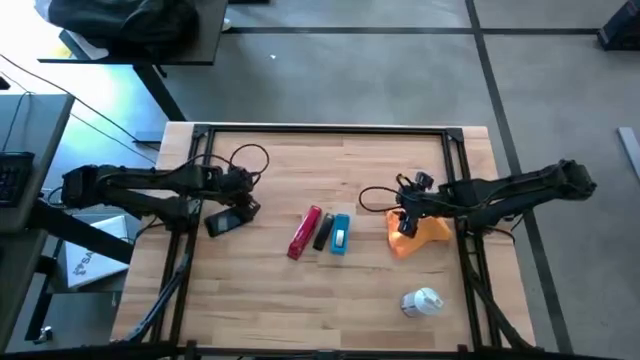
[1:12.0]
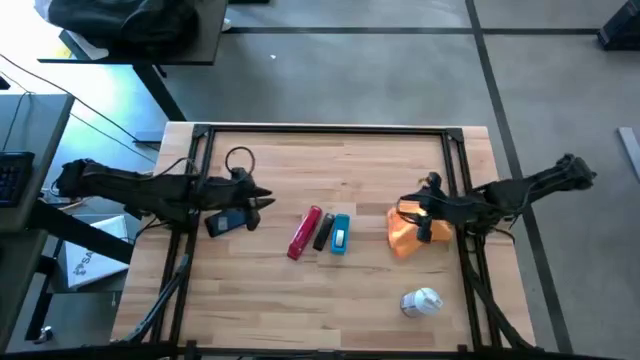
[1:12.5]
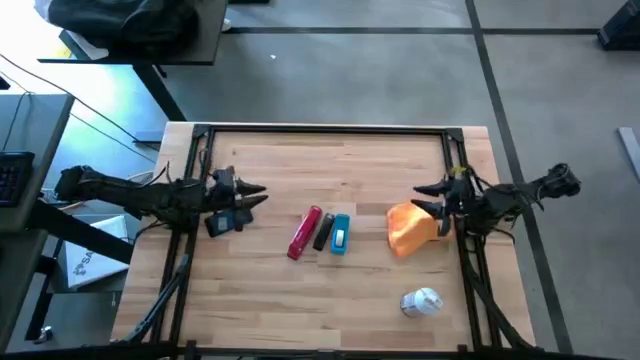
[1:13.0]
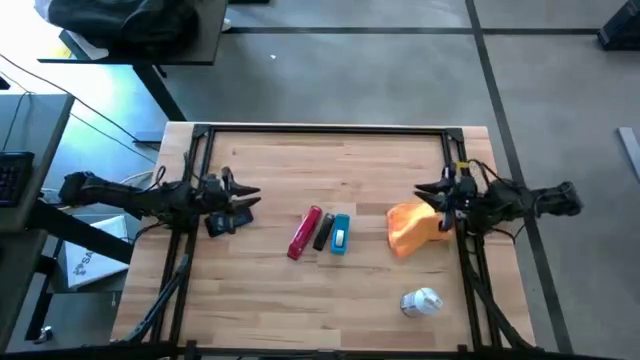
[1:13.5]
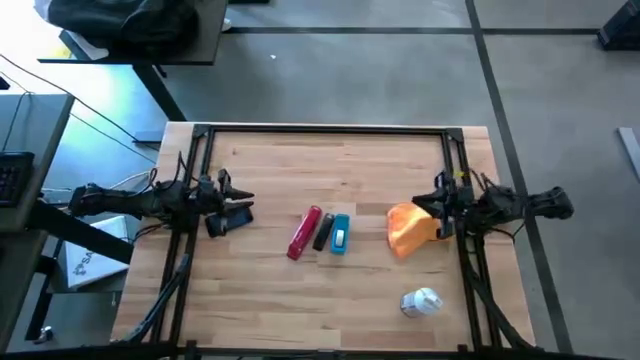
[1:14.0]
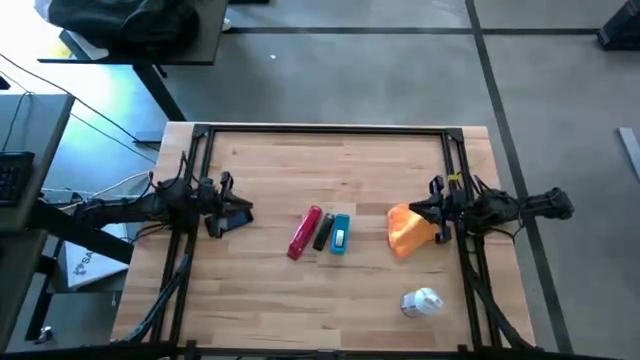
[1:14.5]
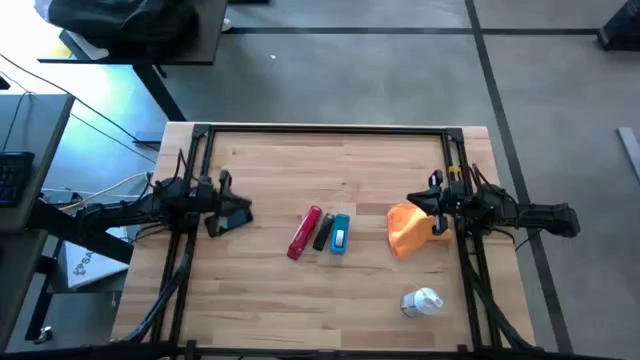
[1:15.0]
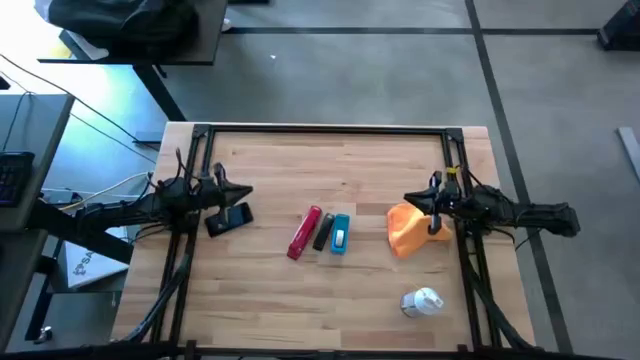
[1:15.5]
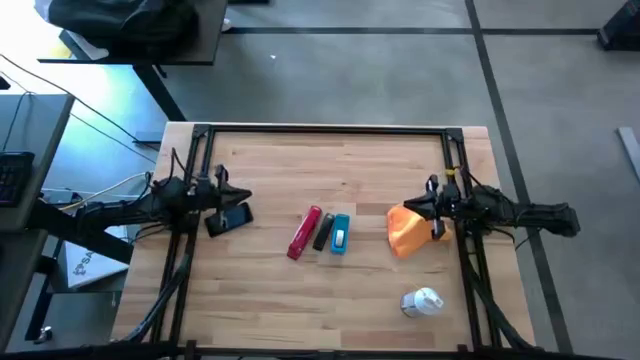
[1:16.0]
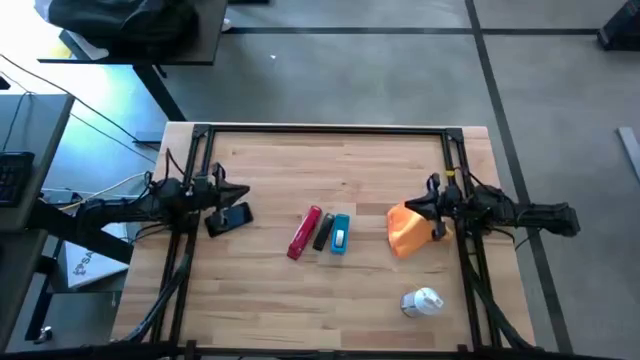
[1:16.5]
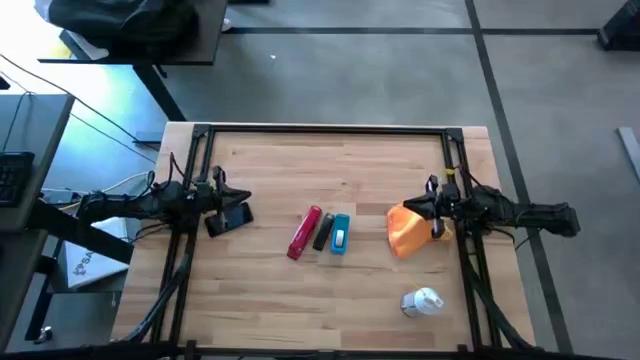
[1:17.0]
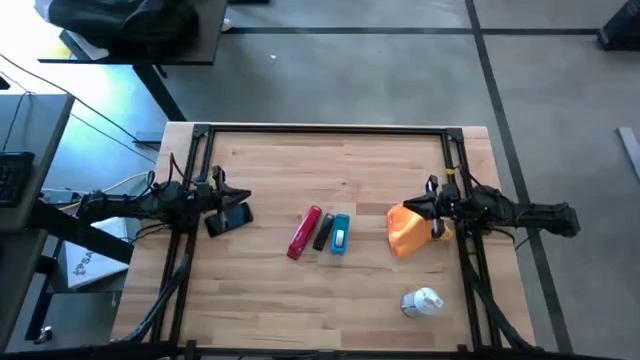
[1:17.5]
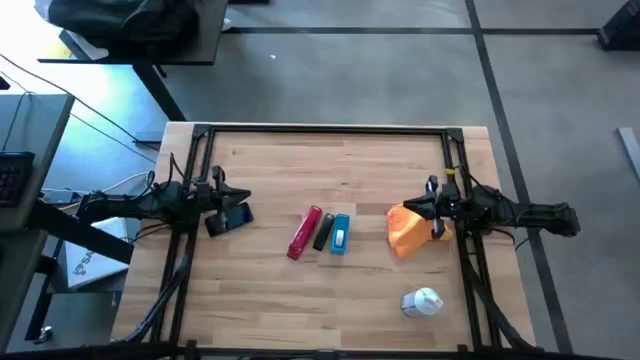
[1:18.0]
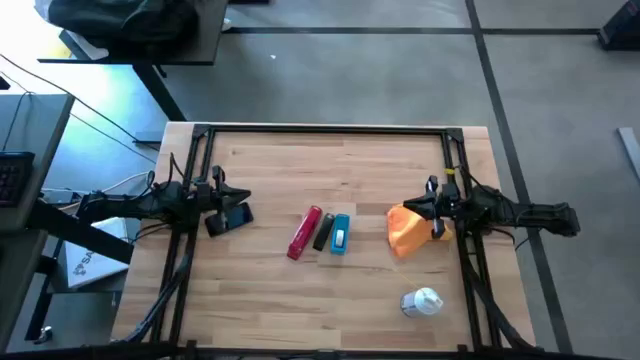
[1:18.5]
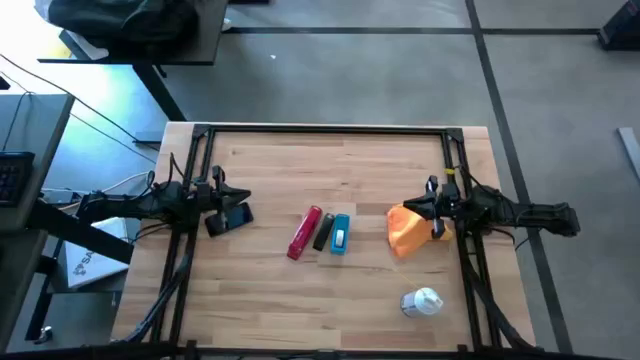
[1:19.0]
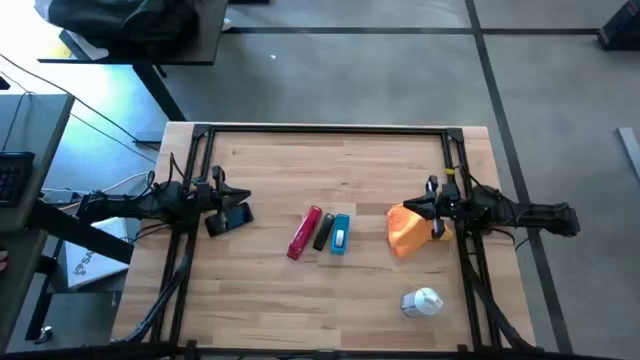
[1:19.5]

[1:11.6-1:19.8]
Task: Apply microfiber cloth
Return to Home Position

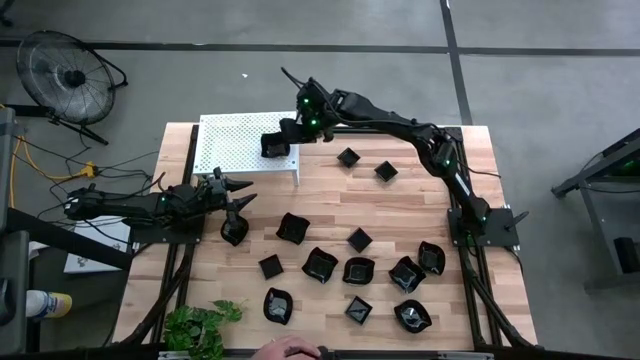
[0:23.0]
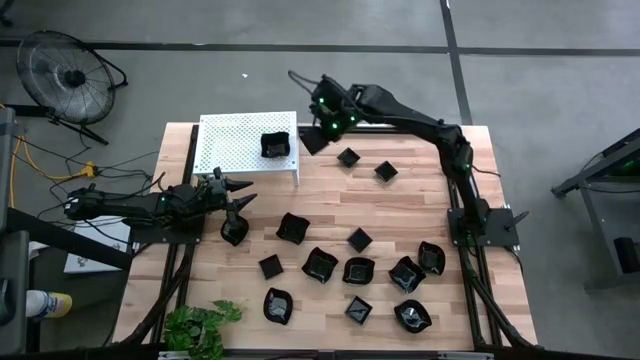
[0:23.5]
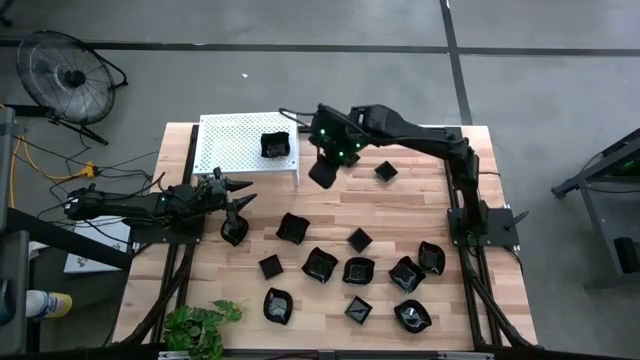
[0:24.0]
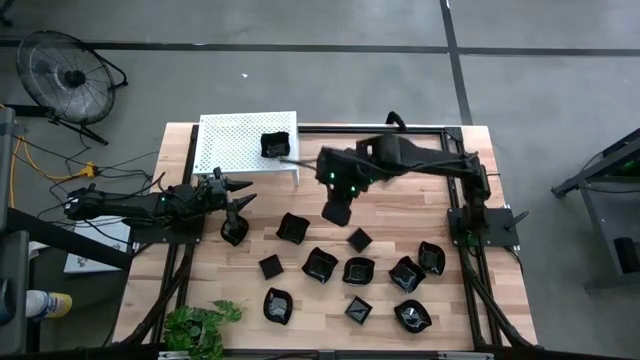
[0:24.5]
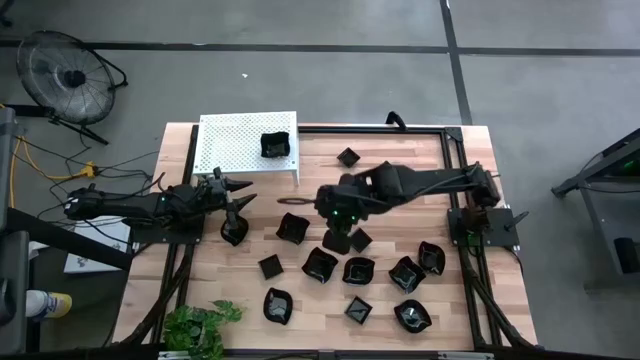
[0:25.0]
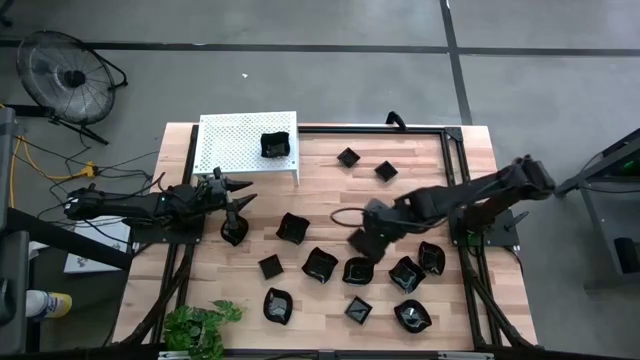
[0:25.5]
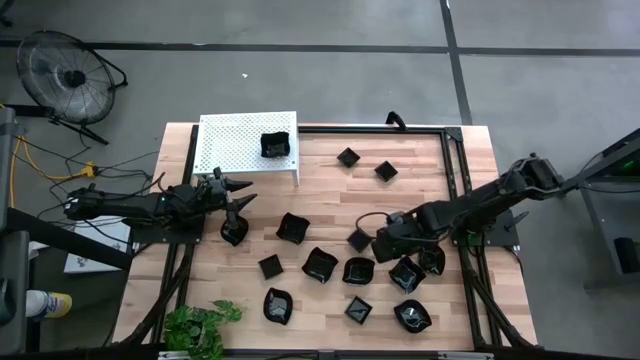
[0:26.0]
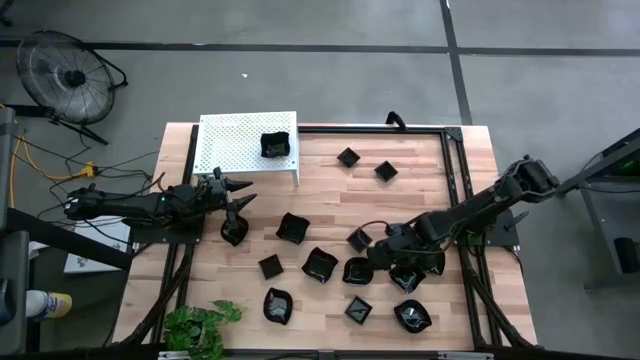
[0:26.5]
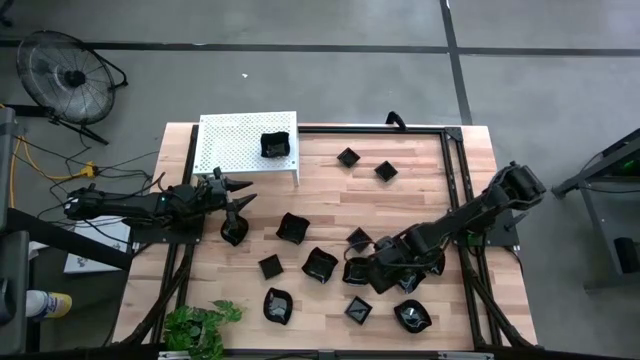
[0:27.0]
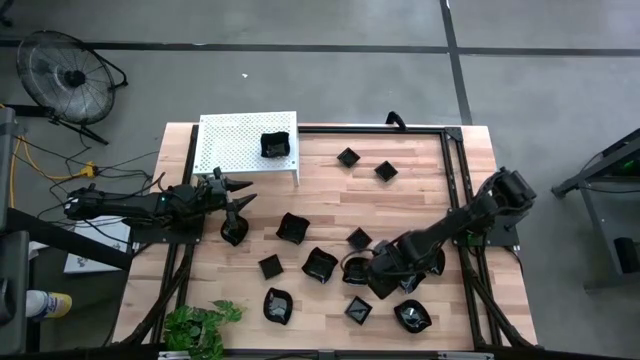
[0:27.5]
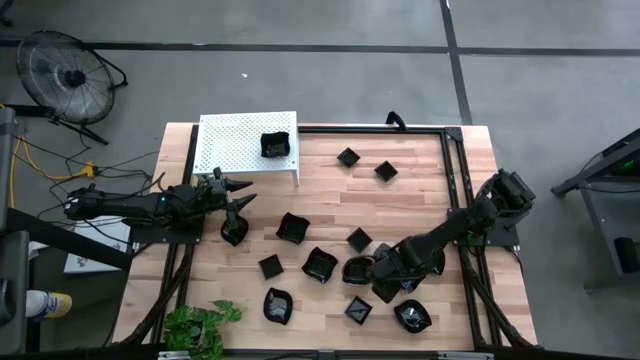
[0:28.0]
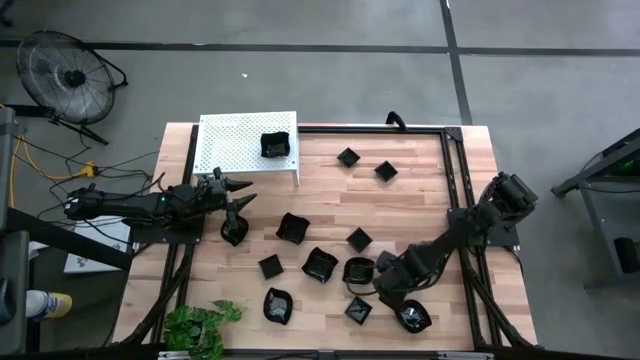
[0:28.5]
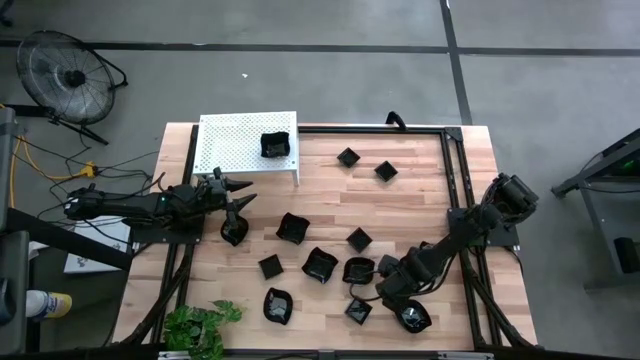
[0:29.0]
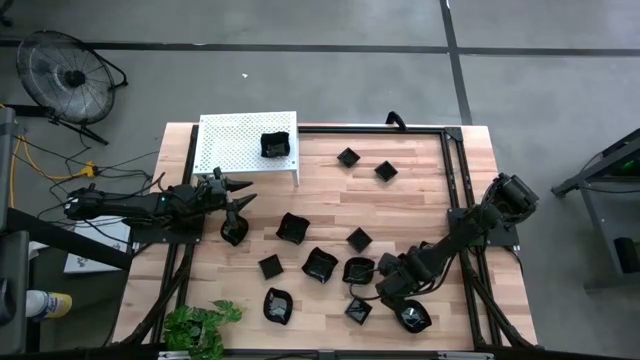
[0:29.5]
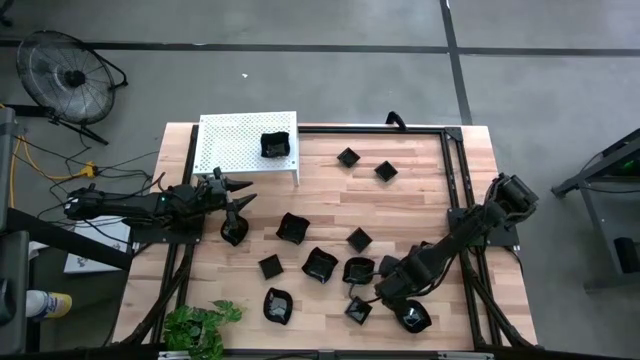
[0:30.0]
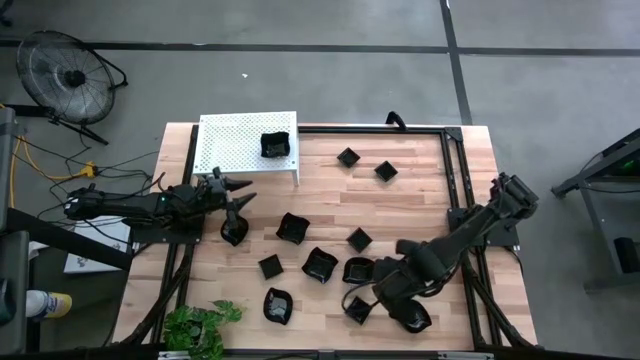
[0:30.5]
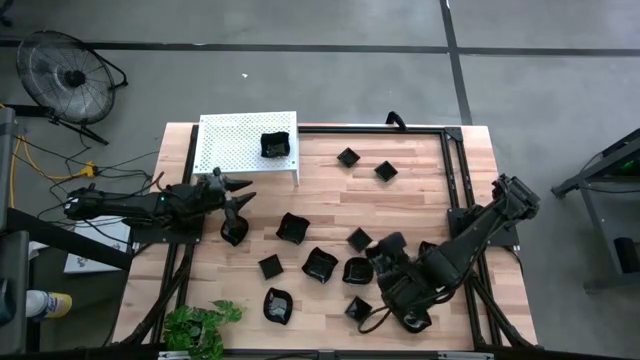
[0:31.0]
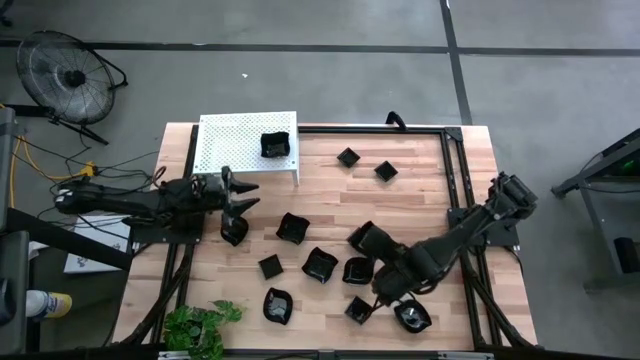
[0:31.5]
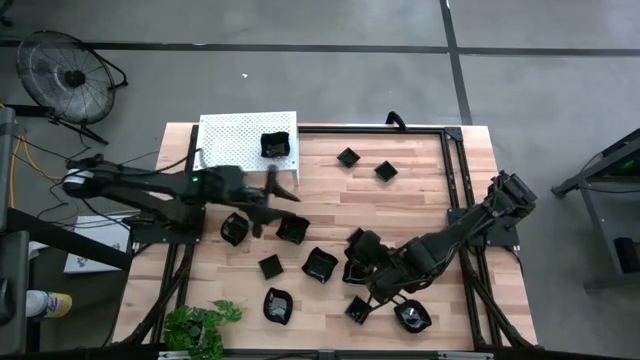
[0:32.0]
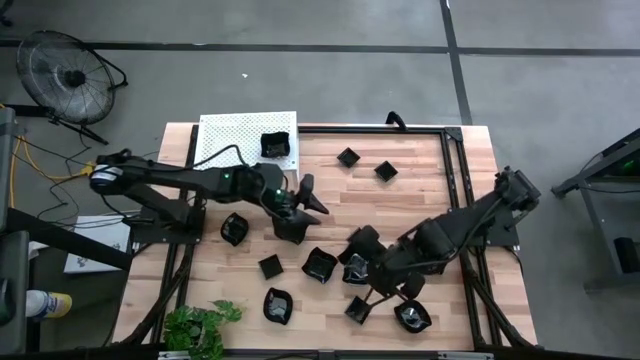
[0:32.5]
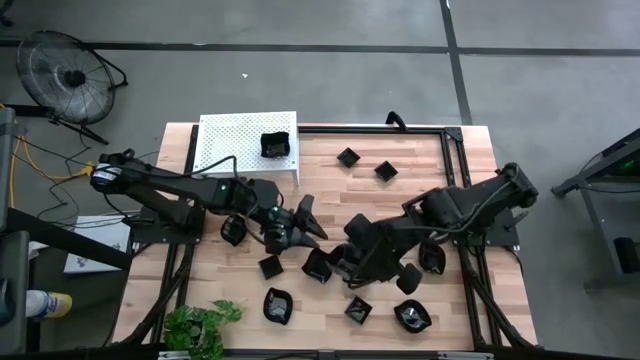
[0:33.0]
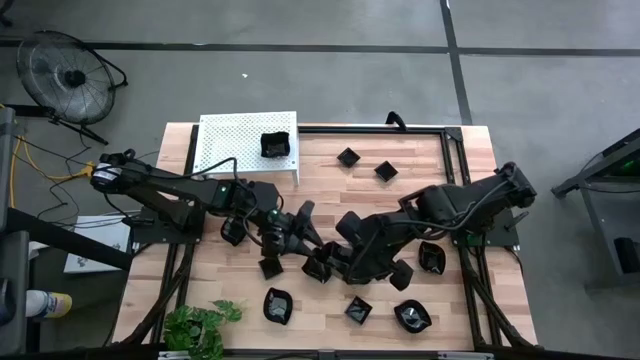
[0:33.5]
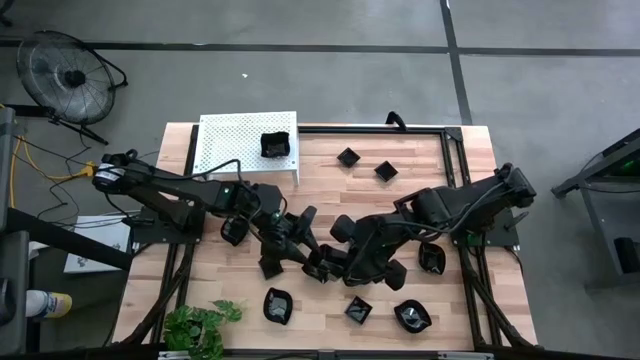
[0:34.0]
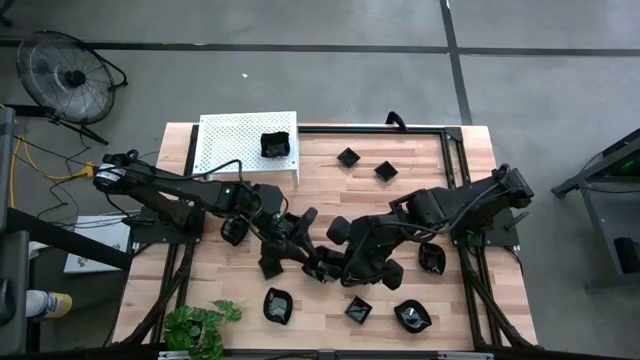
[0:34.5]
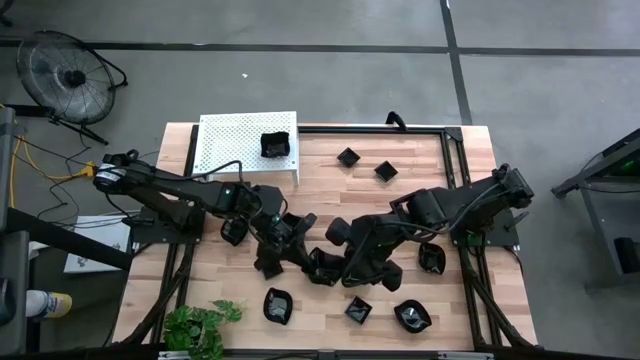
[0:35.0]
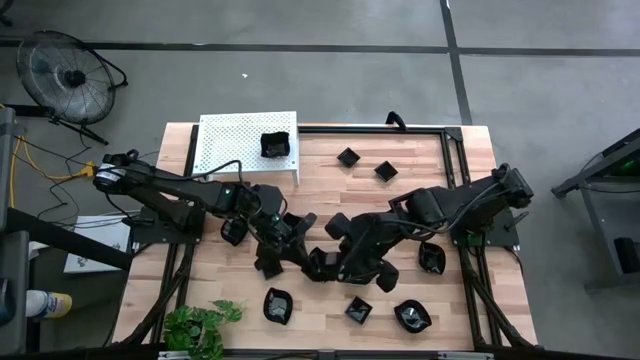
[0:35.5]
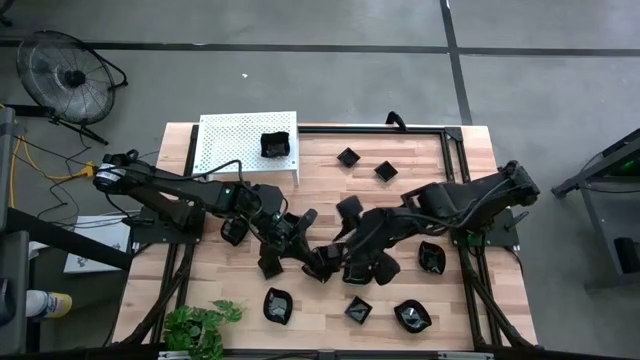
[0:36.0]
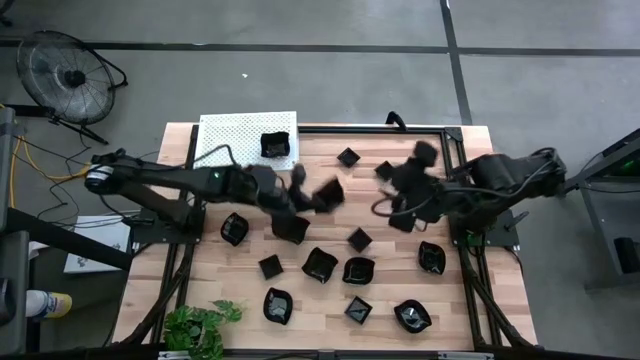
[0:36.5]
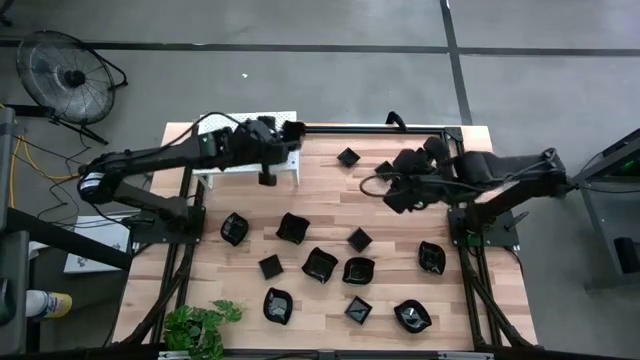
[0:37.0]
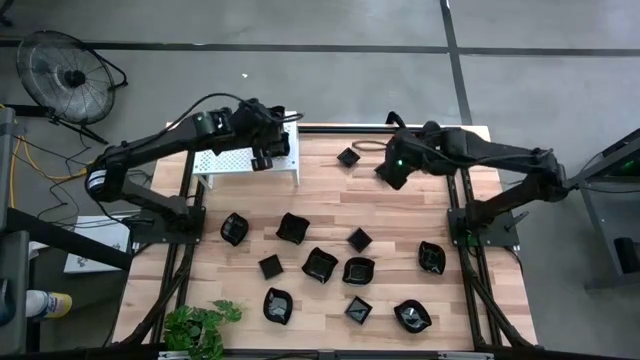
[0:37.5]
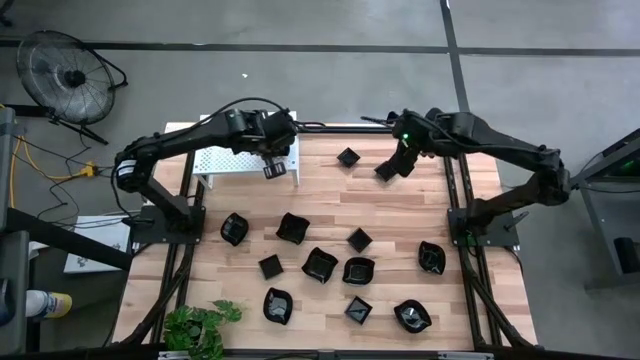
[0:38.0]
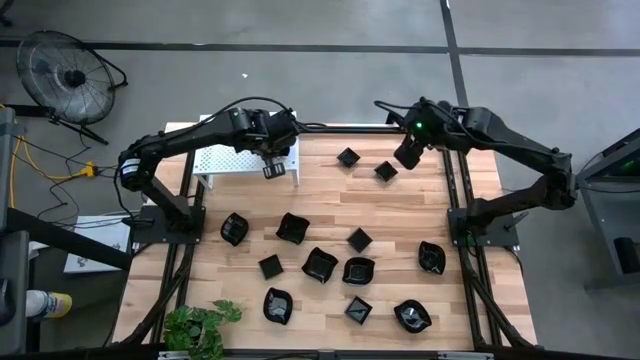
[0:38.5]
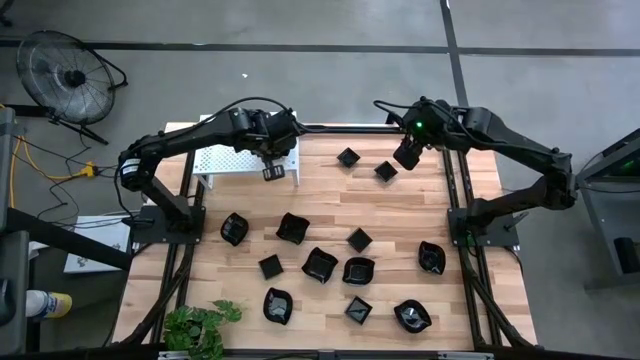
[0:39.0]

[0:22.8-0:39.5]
Task: Pick & Place Mini shaped plates
Stack the black distorted square plate on top of the black distorted square plate on the shelf
